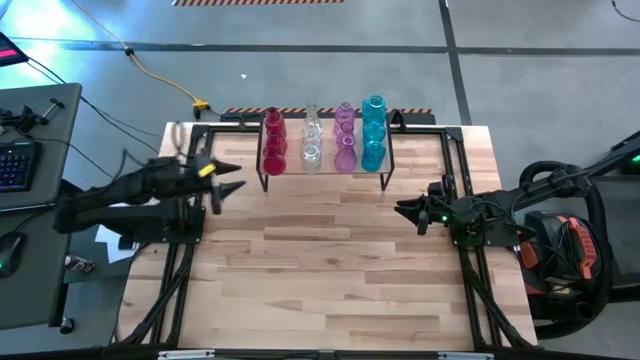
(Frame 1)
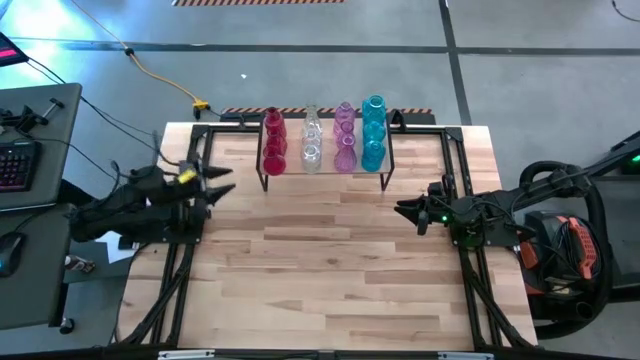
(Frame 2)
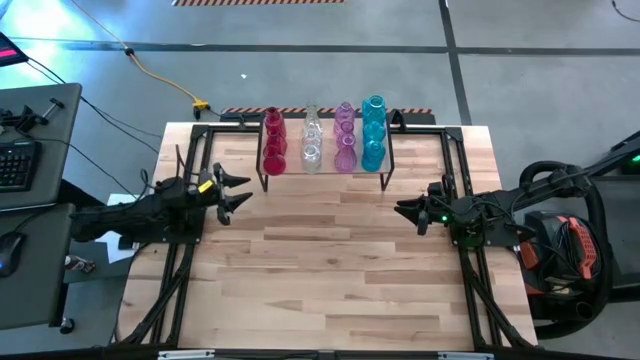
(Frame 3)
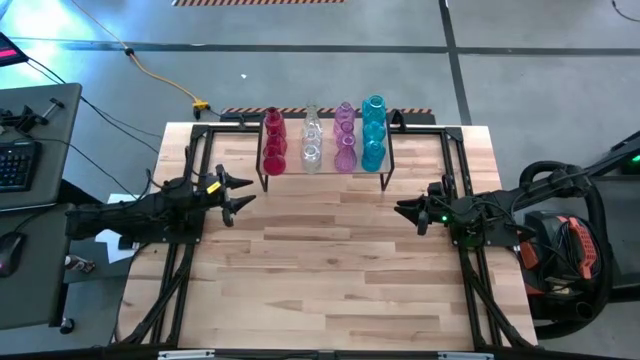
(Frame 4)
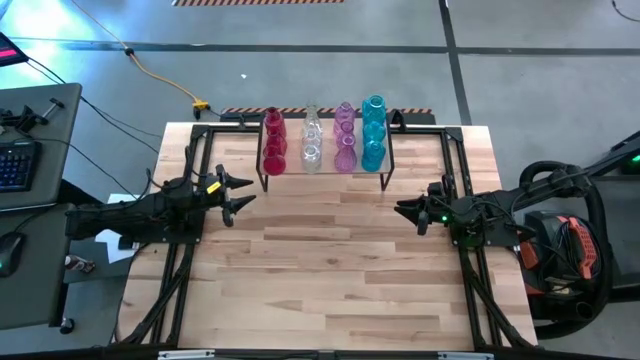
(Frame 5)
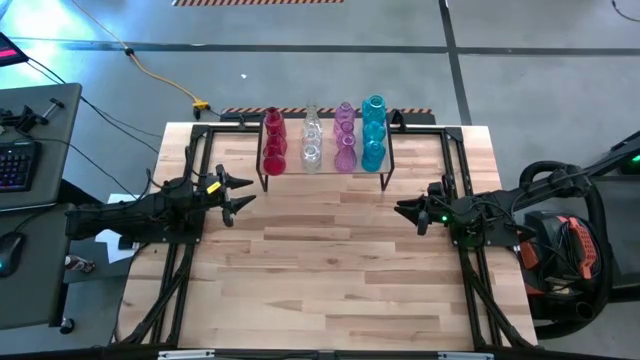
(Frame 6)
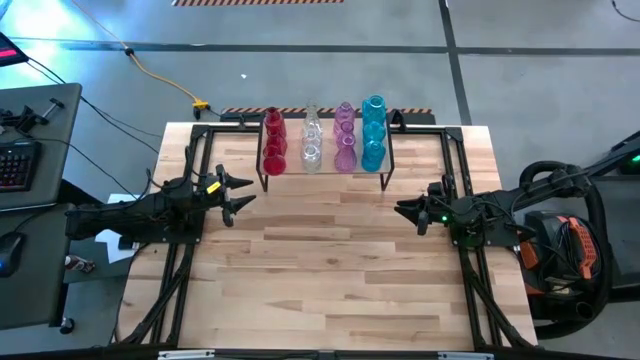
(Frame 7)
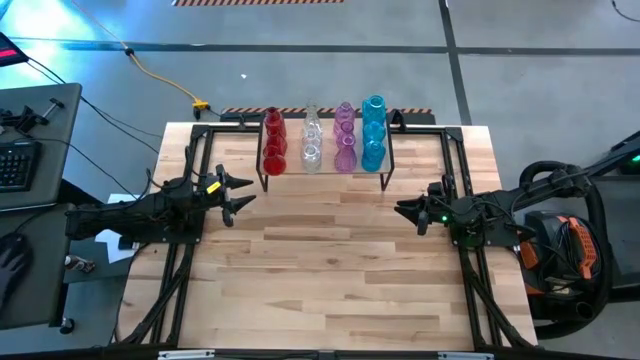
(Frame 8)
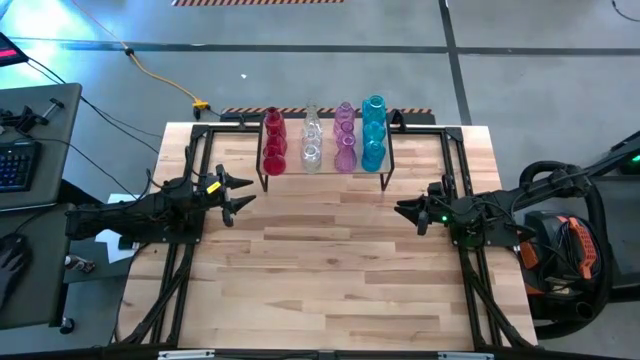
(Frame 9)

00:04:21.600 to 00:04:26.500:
Task: sort vases onto shelf
Return to Home Position

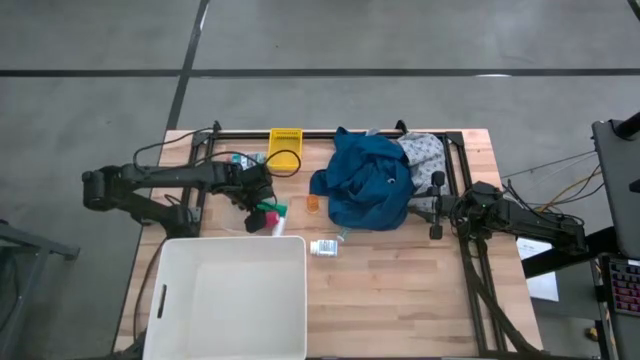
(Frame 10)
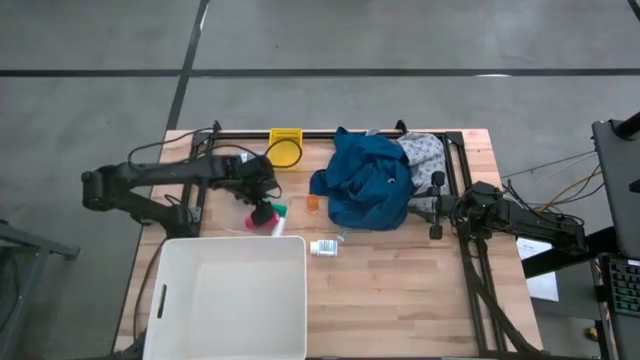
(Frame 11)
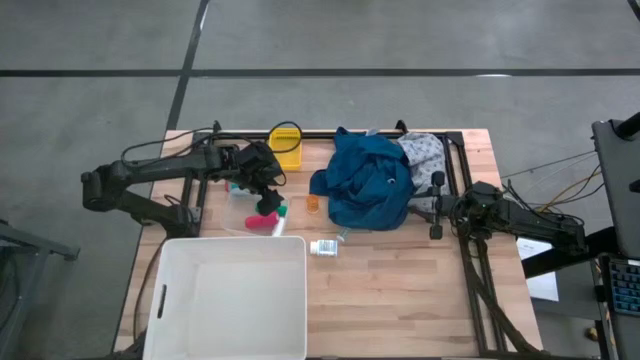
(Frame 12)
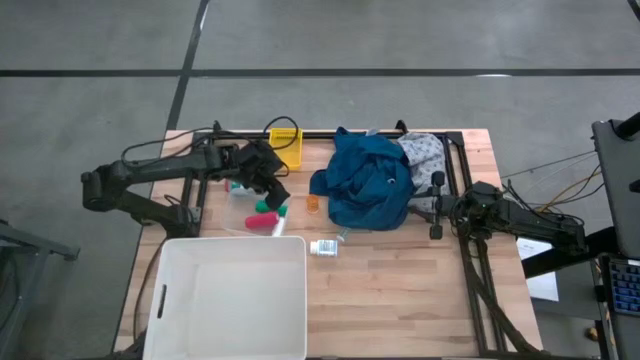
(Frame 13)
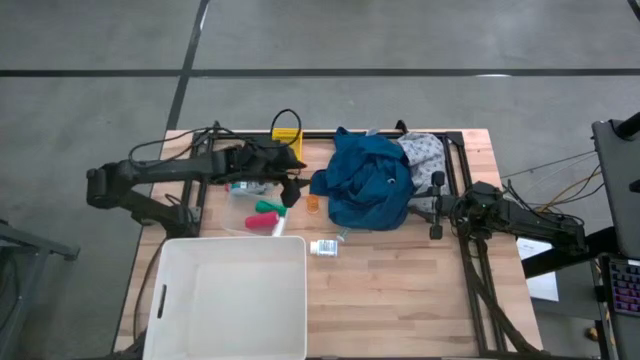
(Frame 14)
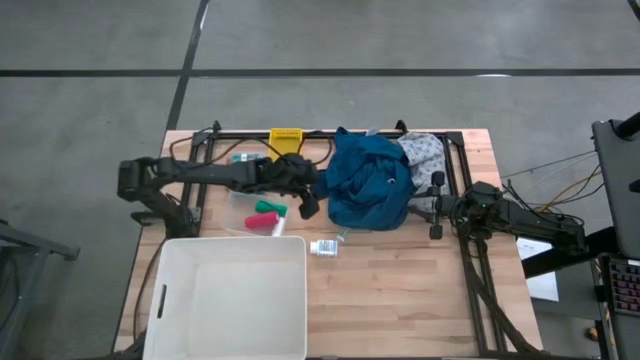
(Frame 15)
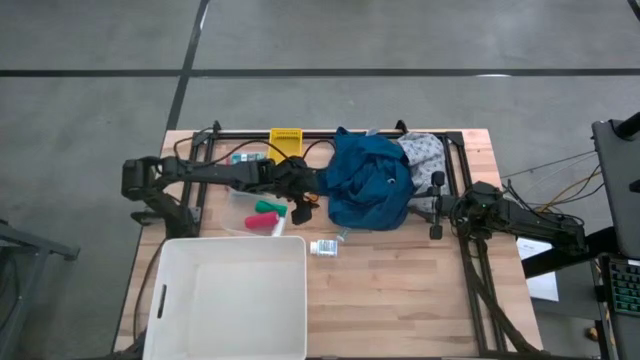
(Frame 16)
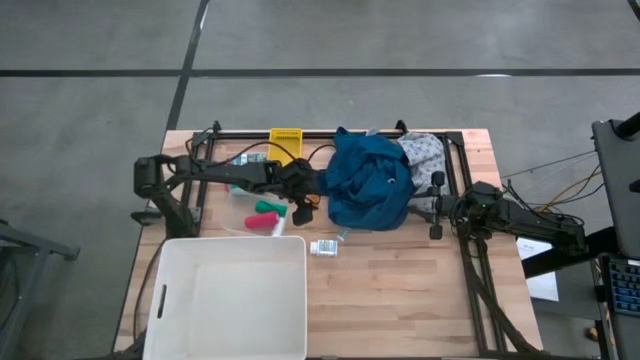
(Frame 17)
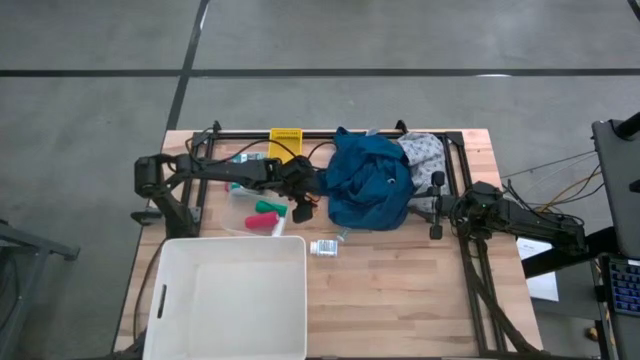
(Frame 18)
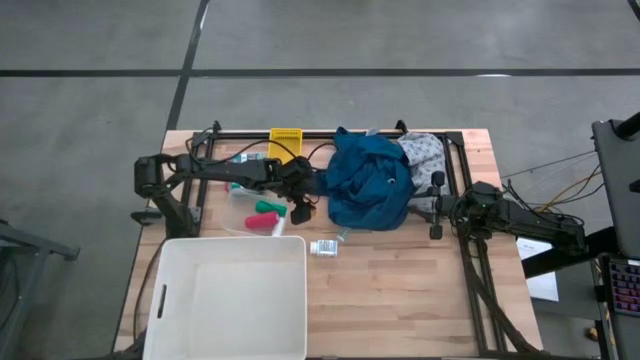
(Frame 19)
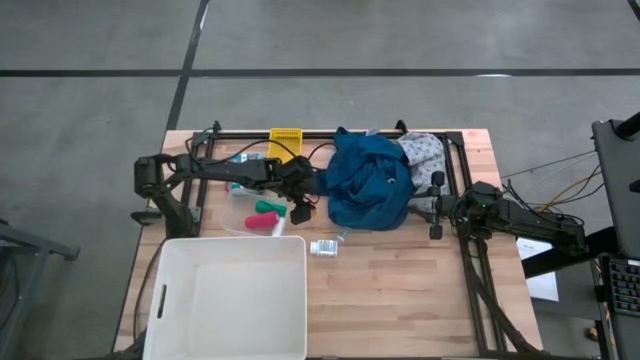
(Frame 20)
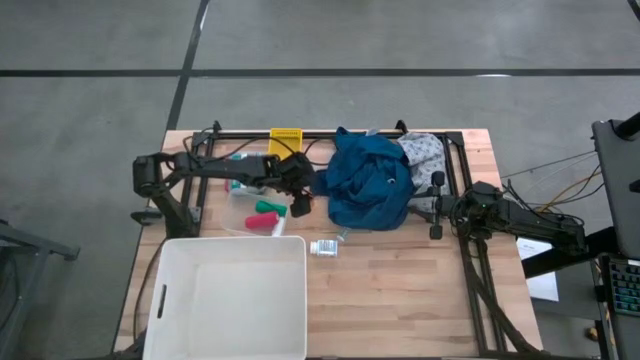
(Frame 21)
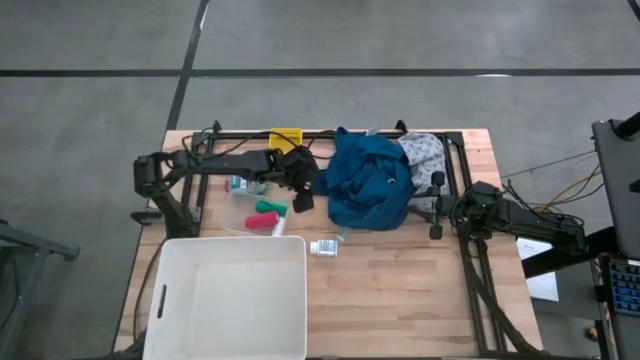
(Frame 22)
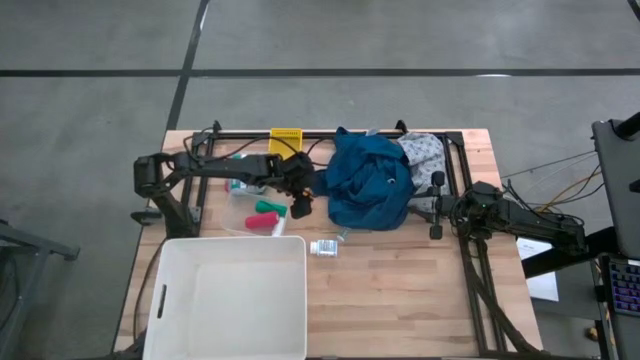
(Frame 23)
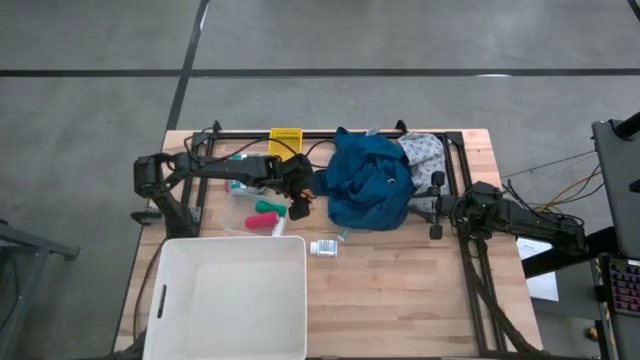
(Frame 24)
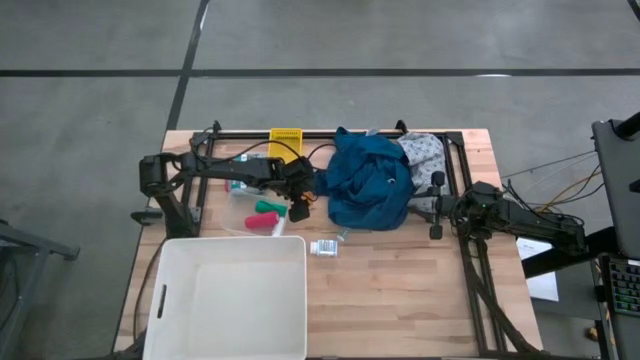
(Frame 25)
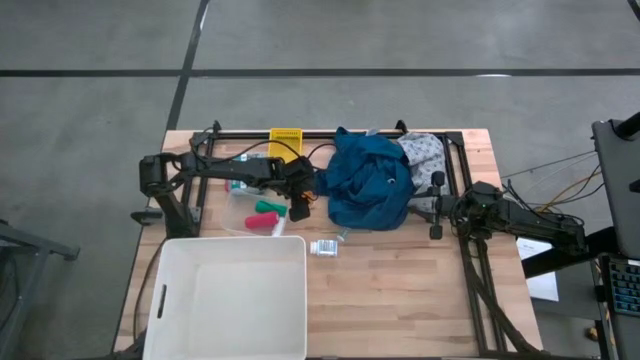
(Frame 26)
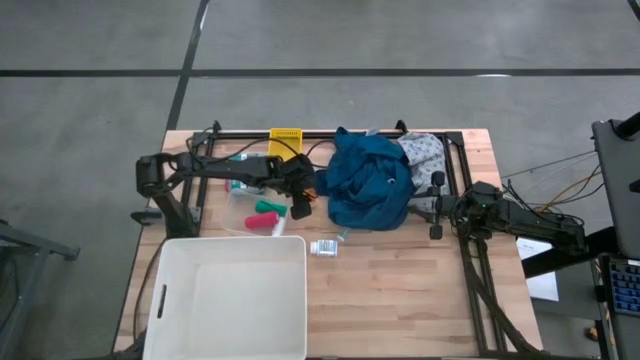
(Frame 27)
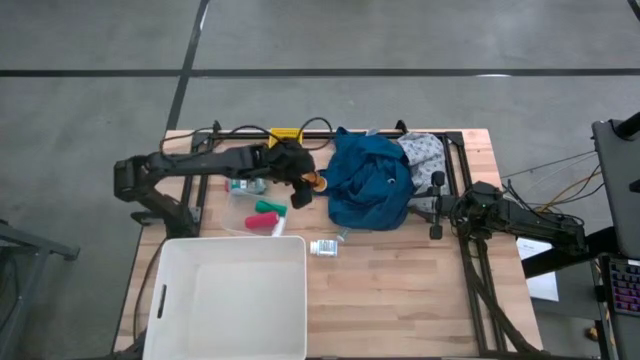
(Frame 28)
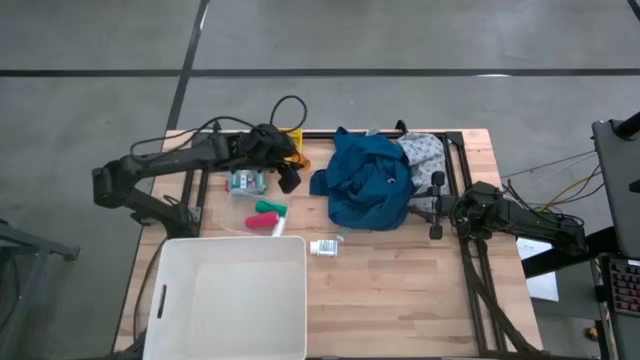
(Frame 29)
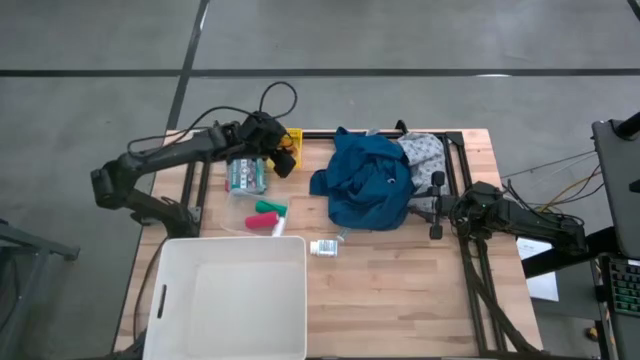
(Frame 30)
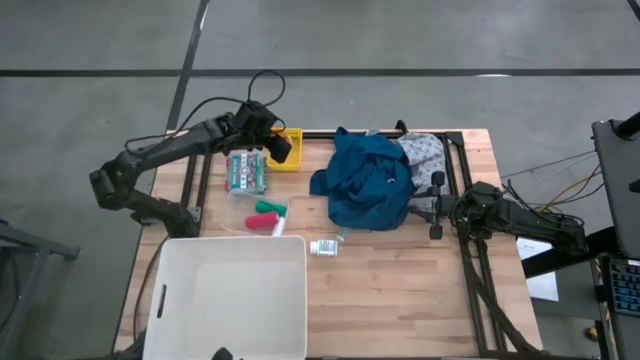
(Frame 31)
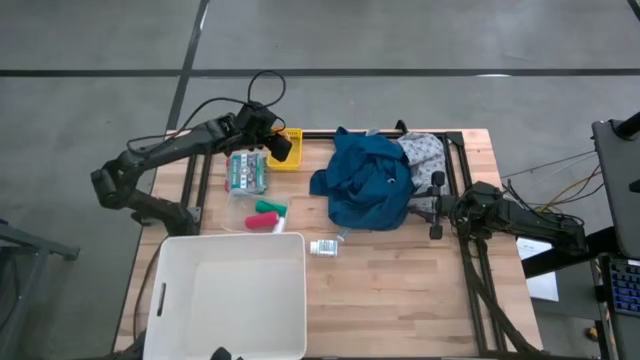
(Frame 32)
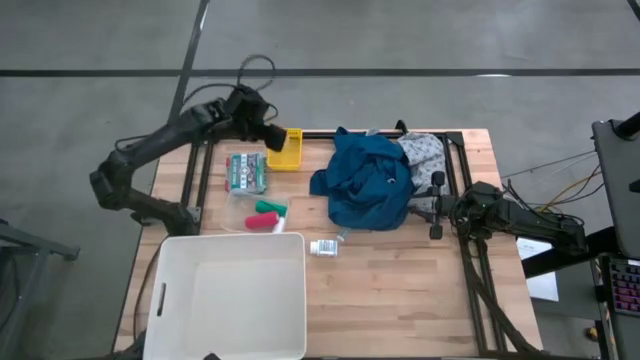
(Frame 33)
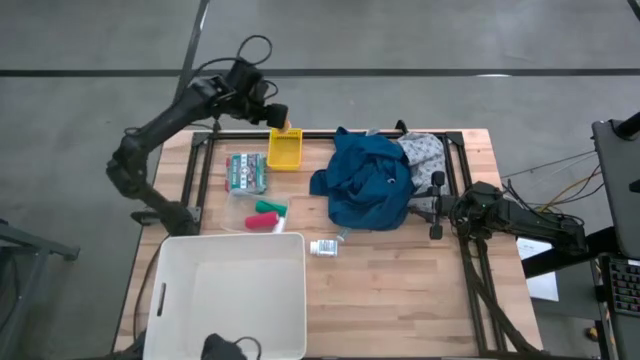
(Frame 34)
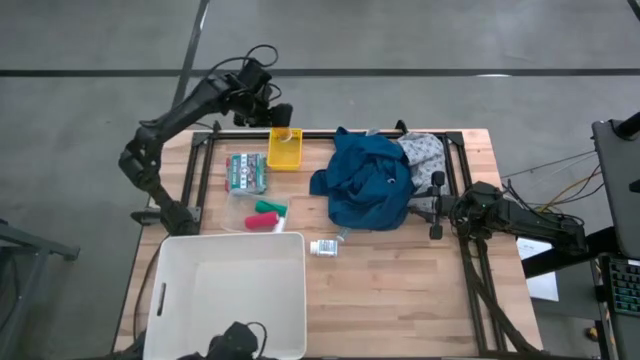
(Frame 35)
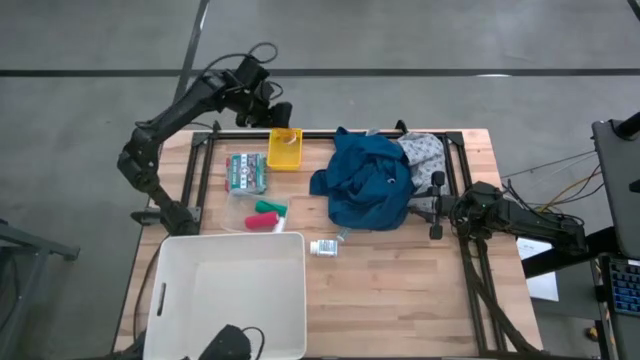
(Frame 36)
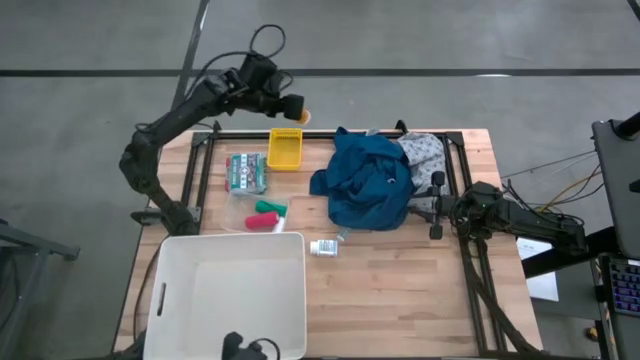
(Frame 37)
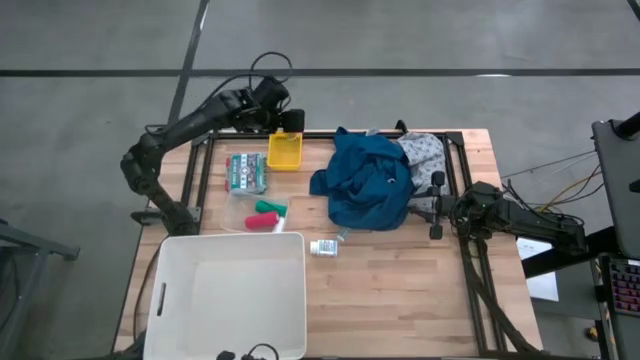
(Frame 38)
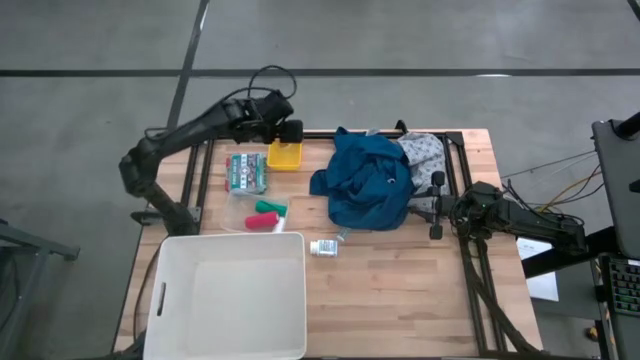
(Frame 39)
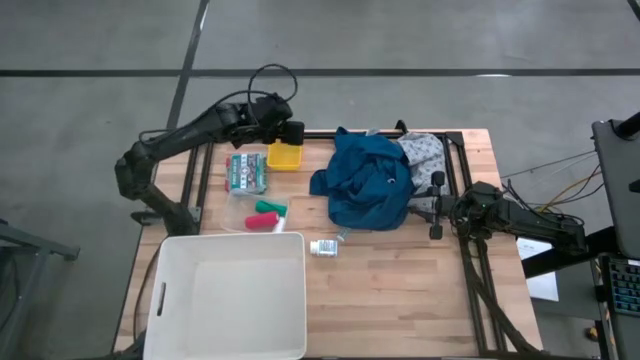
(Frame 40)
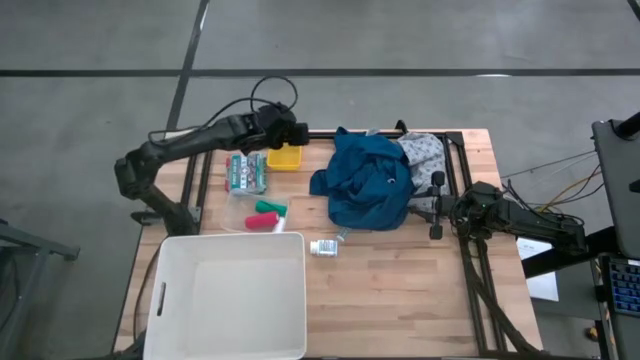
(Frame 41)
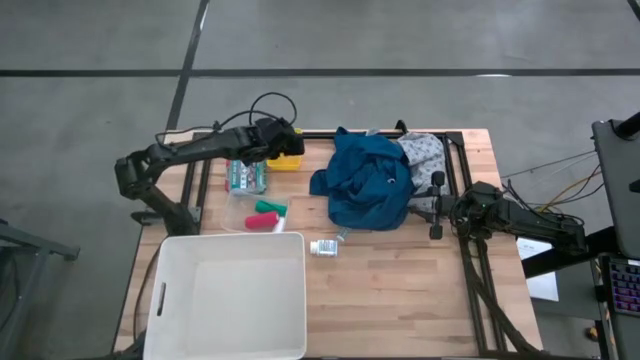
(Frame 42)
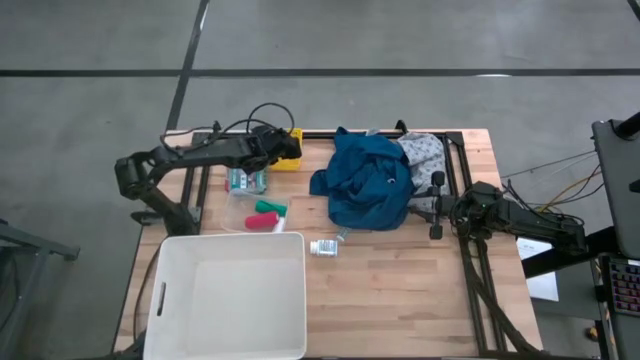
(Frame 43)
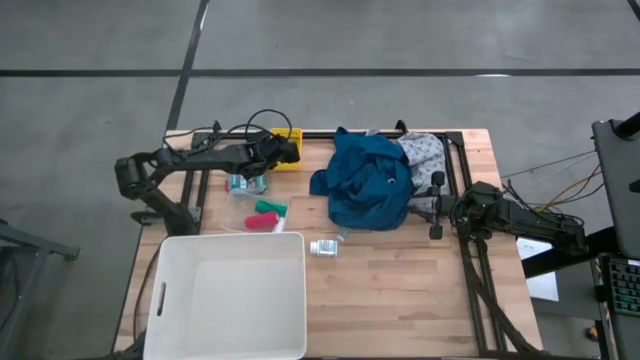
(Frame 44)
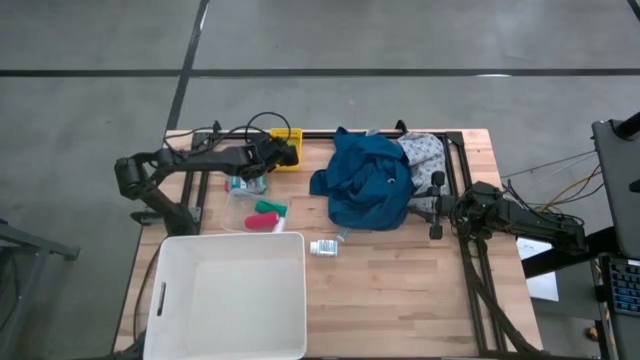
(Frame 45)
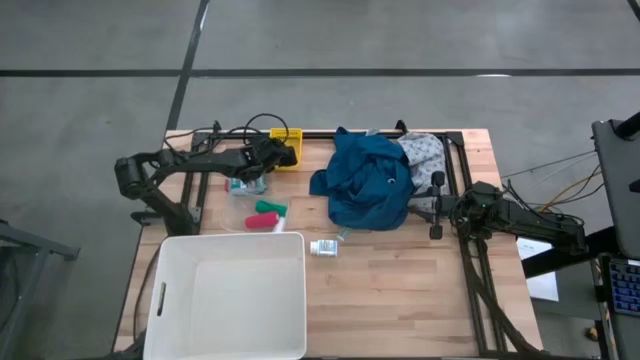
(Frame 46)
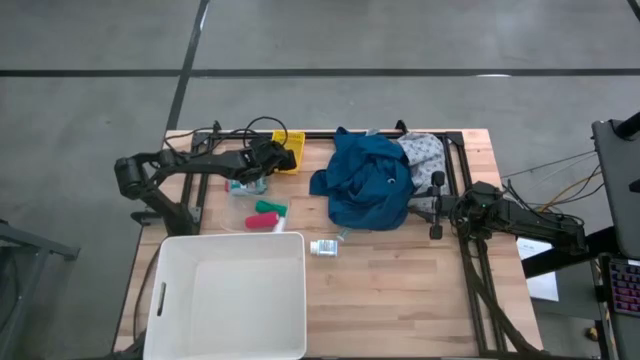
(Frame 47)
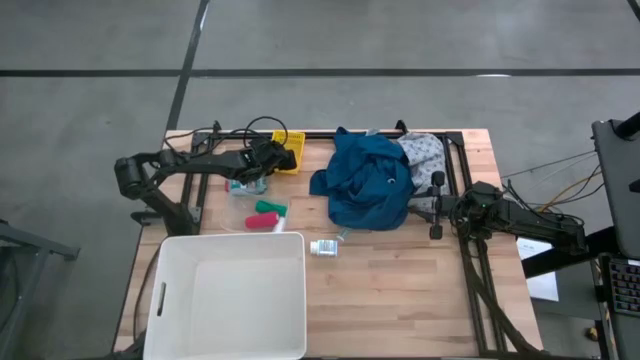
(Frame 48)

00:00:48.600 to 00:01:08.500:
Task: Pick & place medical supplies in basket/bin
Put the orange pill bottle into the yellow bin
